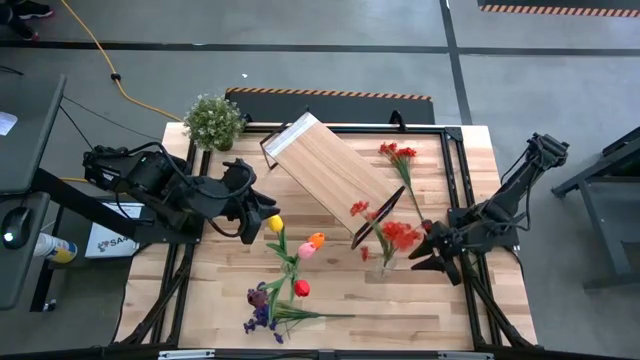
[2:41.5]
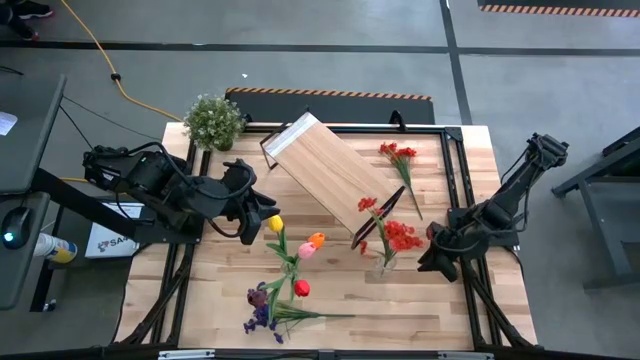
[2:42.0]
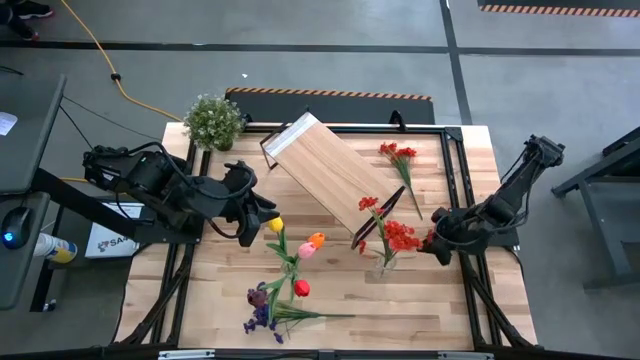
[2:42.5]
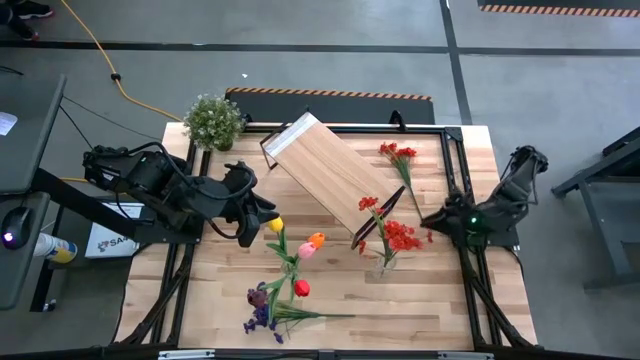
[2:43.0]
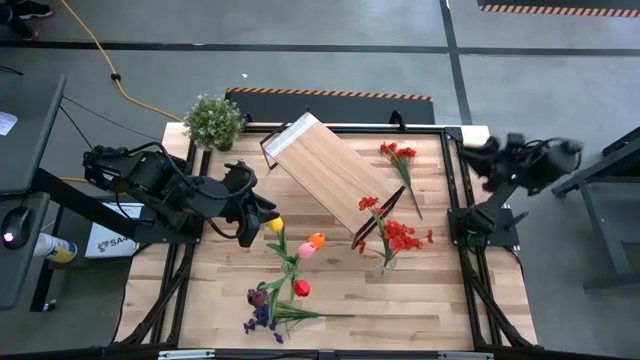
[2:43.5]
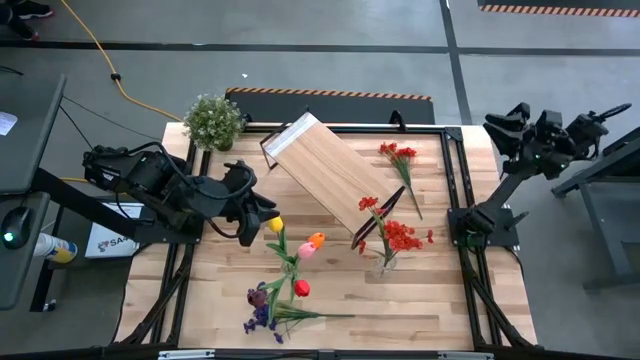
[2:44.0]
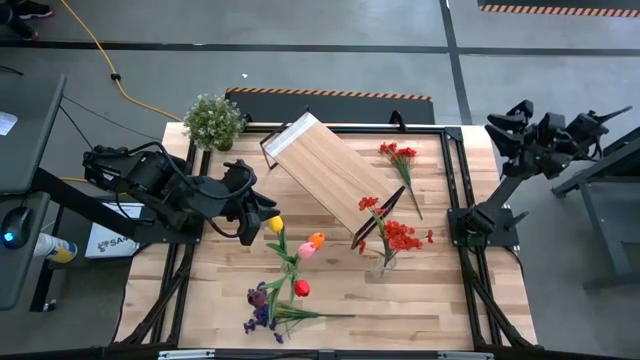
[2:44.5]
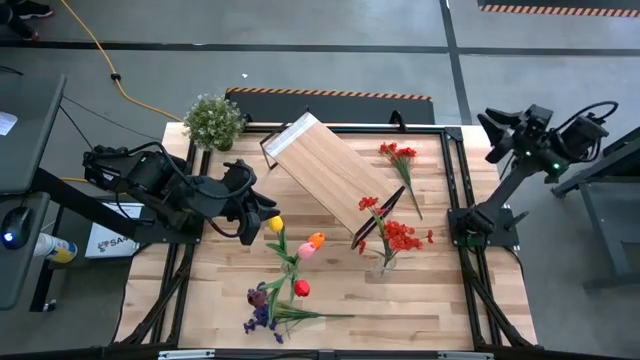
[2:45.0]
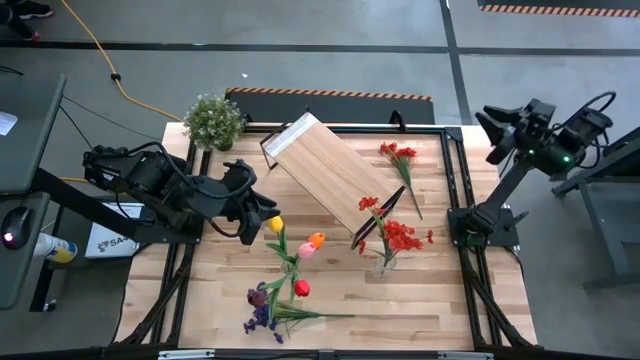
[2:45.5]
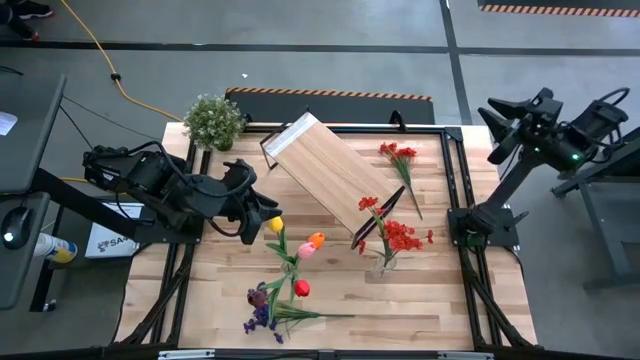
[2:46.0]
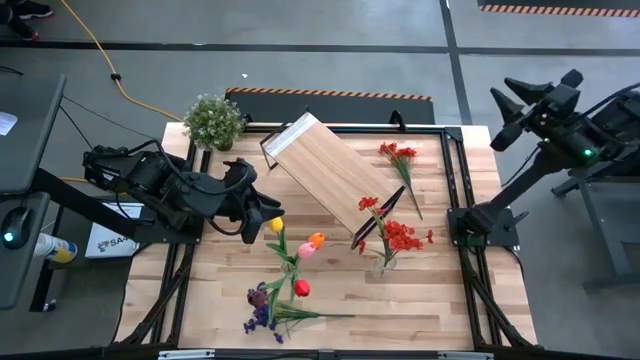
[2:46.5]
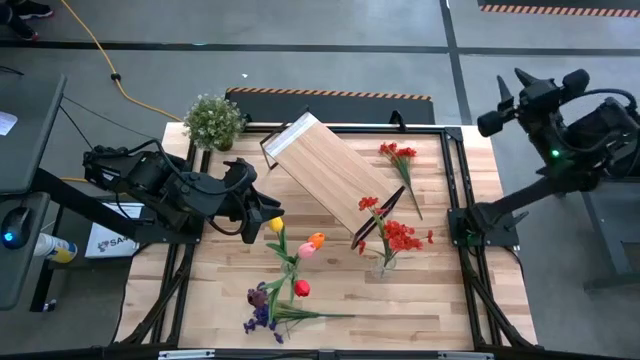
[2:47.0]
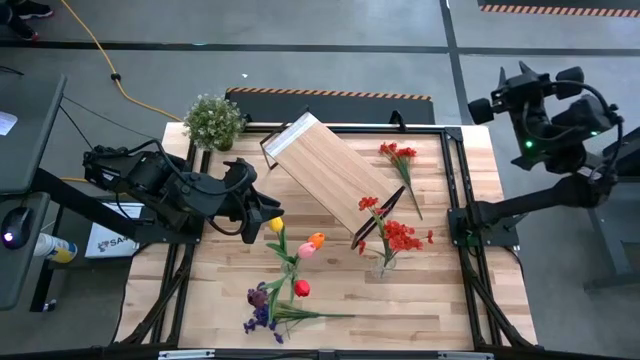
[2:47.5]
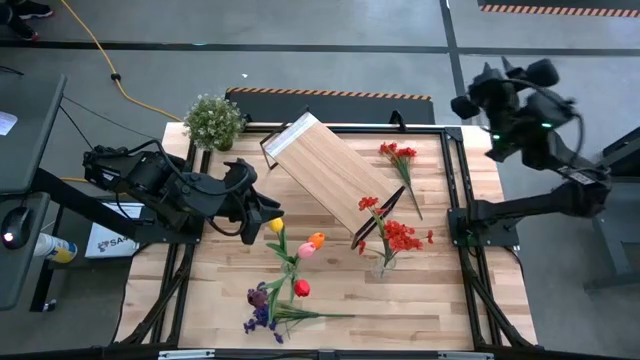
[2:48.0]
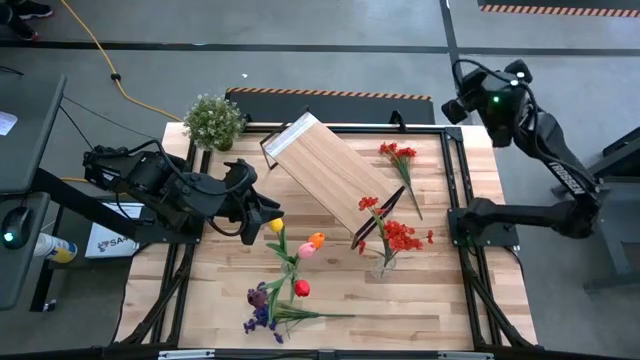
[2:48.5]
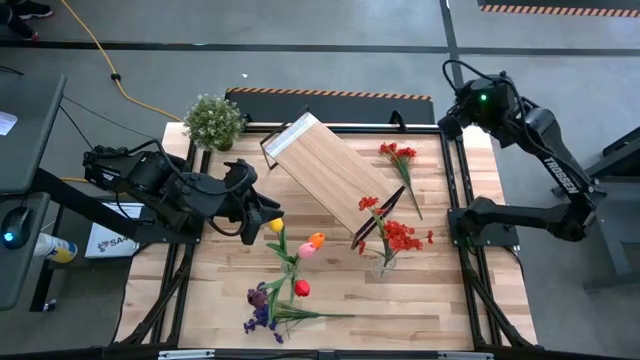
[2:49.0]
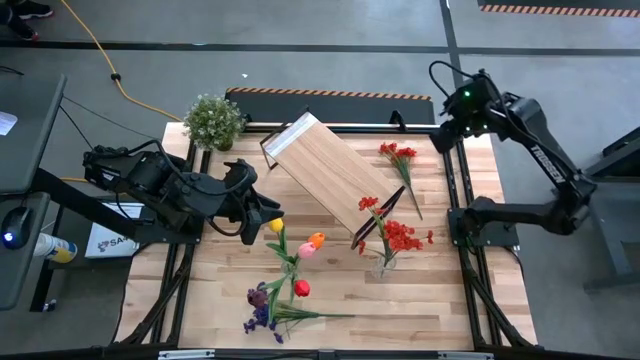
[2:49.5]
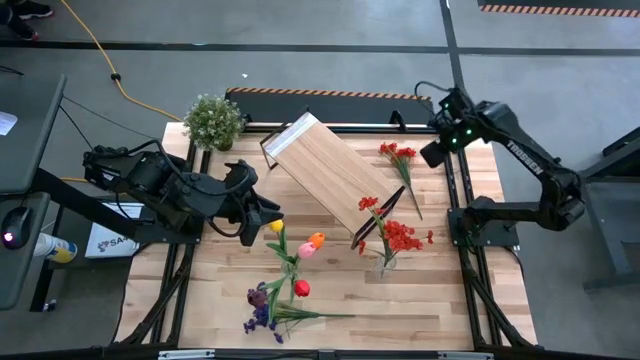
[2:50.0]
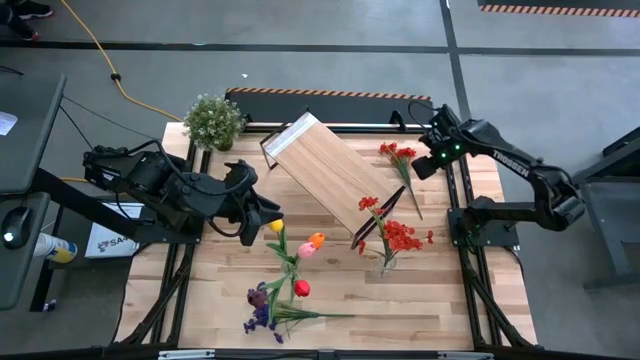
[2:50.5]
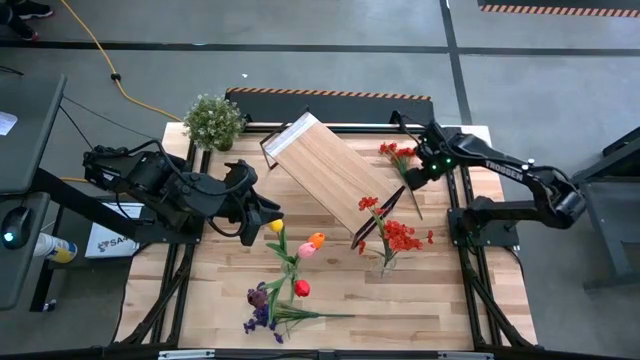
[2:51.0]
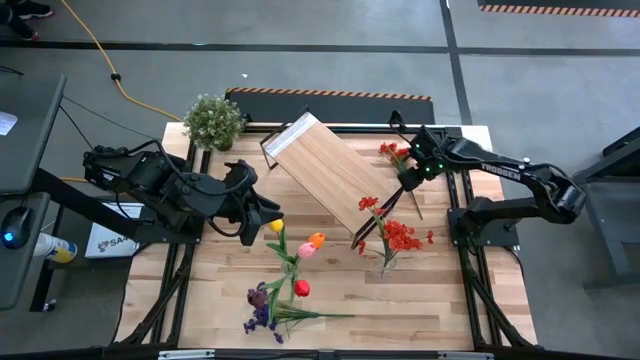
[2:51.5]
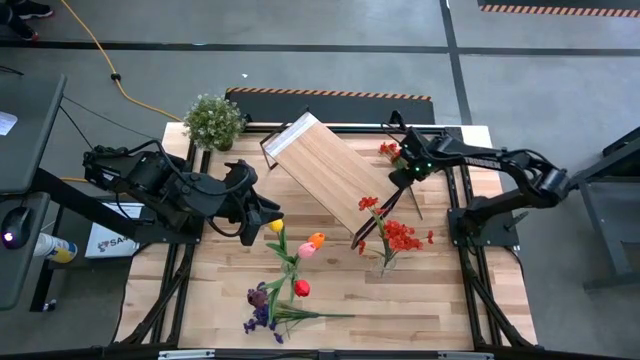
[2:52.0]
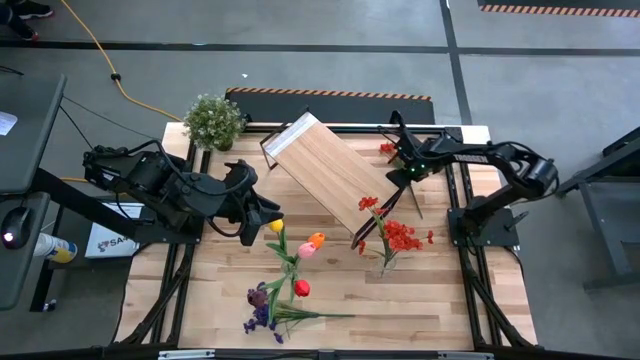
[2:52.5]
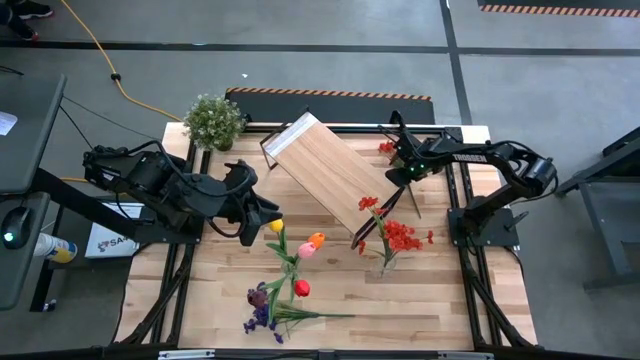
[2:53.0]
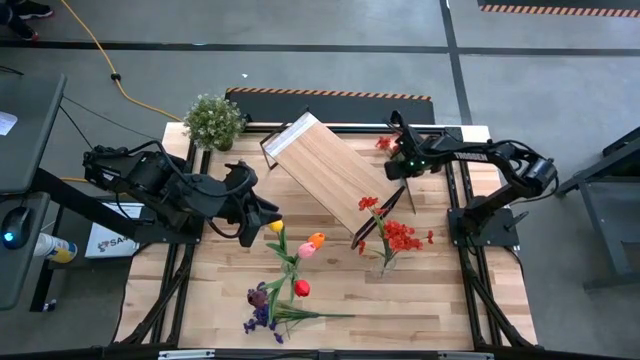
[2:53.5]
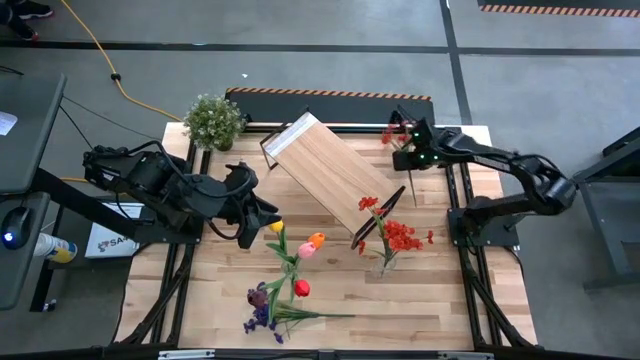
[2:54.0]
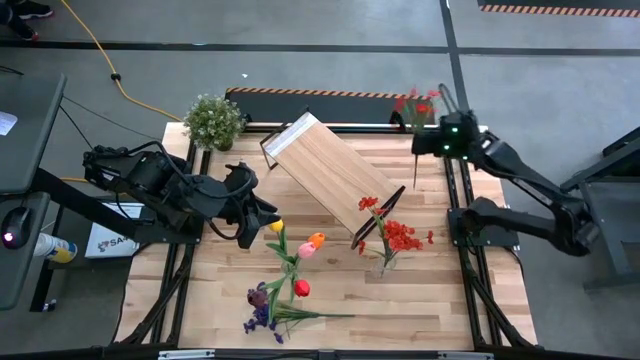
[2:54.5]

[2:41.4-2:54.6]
Task: Pick and place flowers into a vace then onto a shelf
Put the orange flowers into the right transparent vase

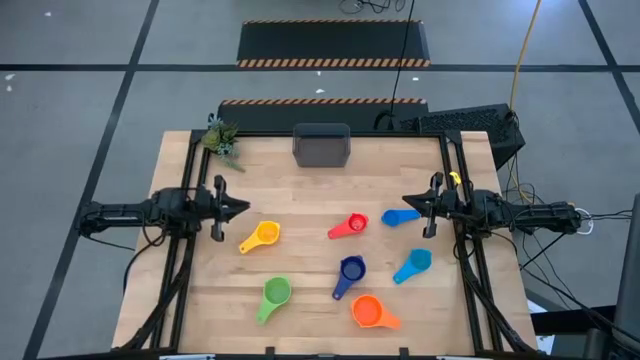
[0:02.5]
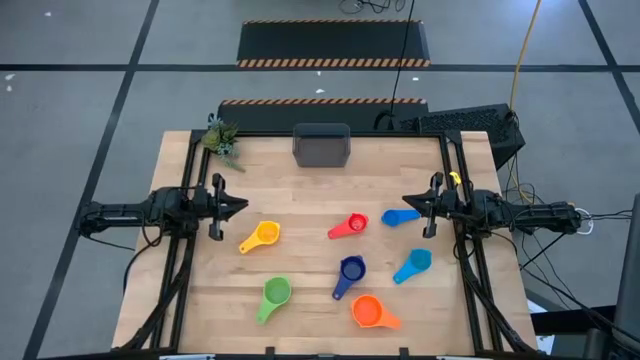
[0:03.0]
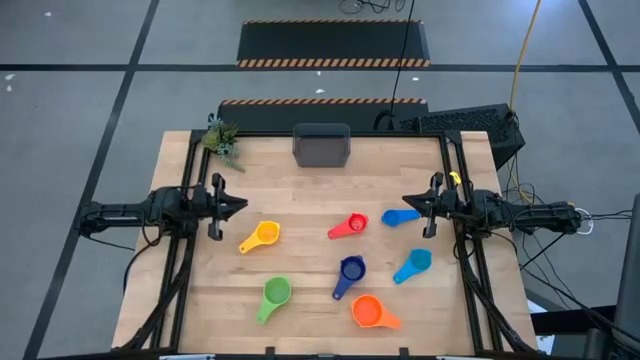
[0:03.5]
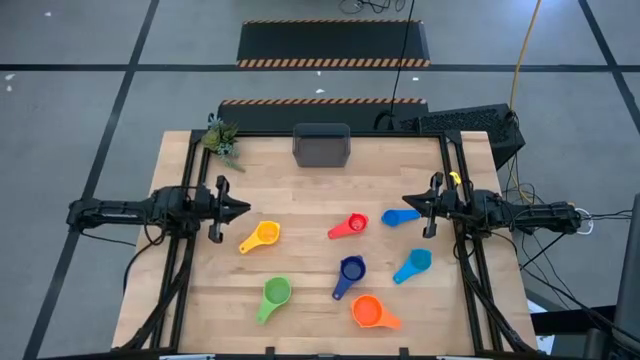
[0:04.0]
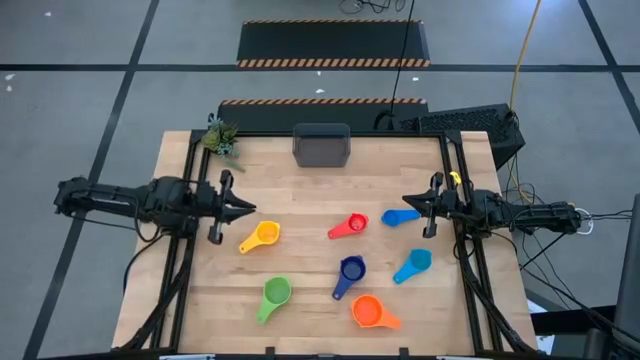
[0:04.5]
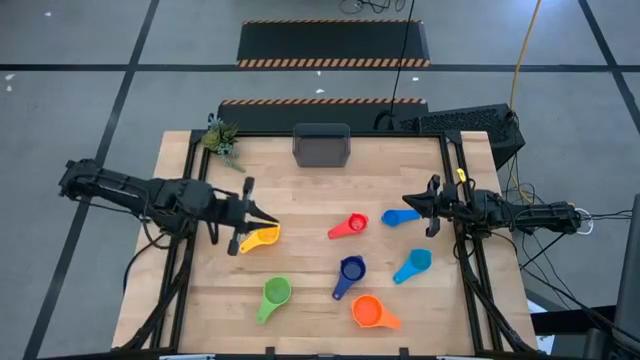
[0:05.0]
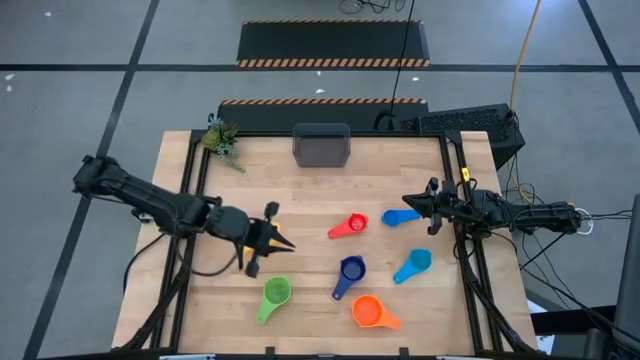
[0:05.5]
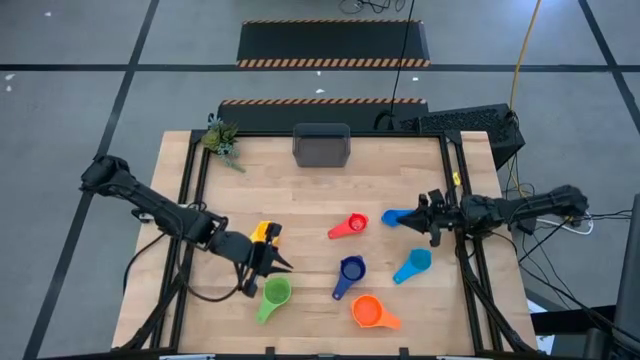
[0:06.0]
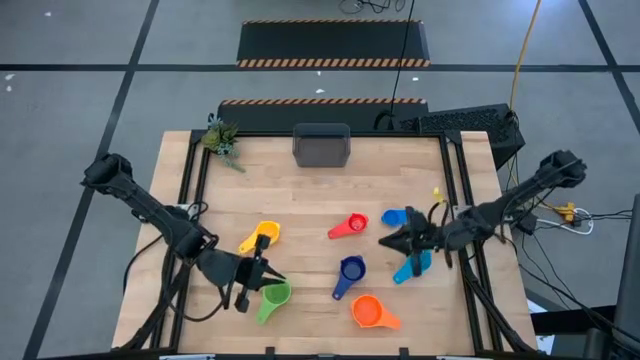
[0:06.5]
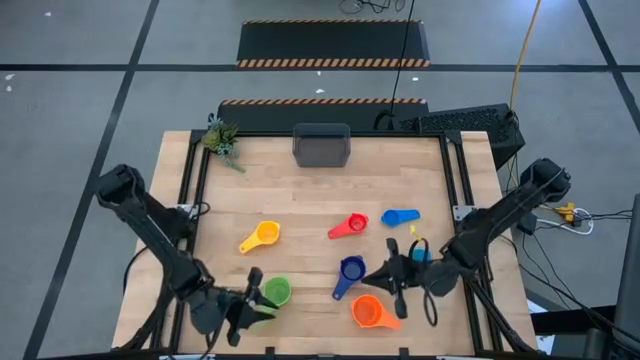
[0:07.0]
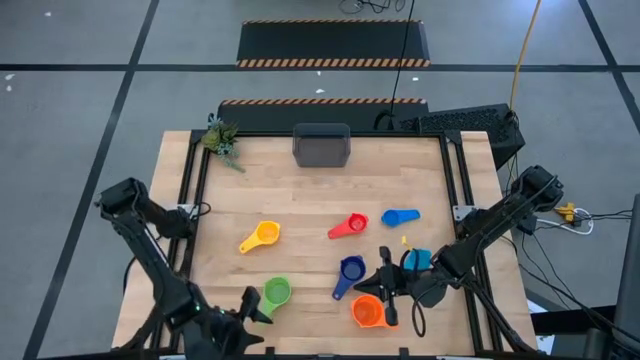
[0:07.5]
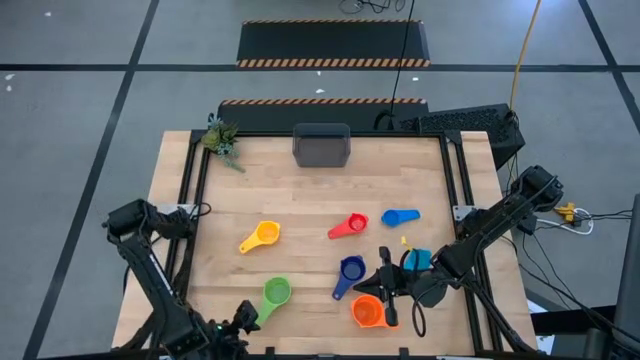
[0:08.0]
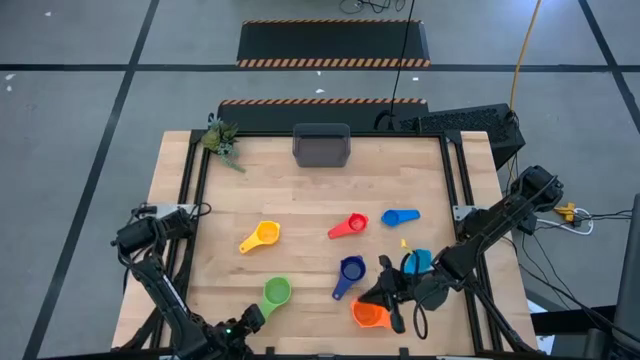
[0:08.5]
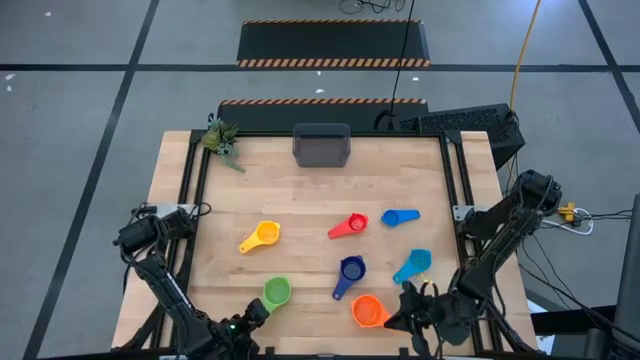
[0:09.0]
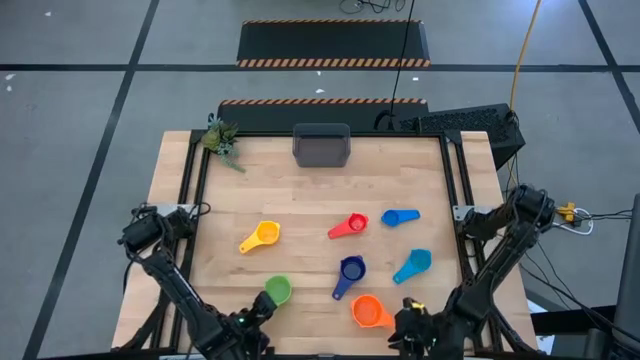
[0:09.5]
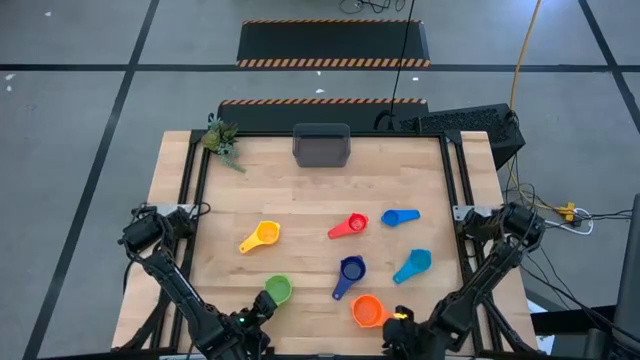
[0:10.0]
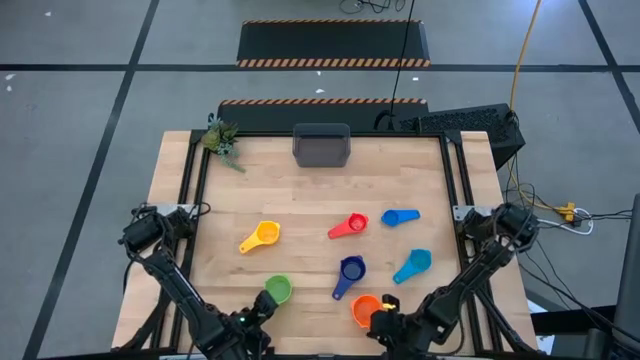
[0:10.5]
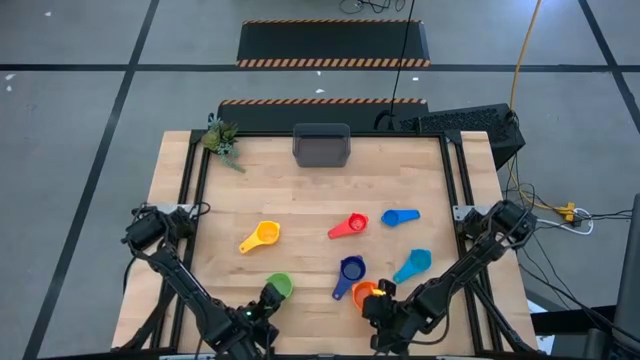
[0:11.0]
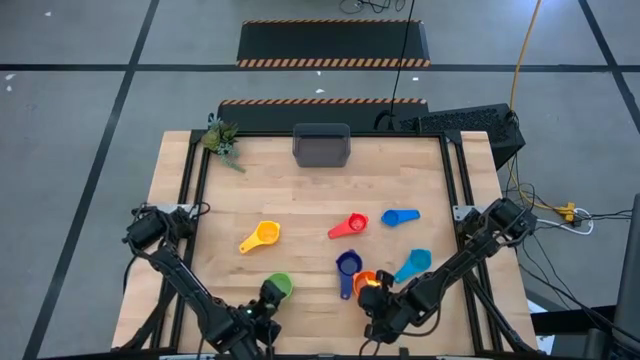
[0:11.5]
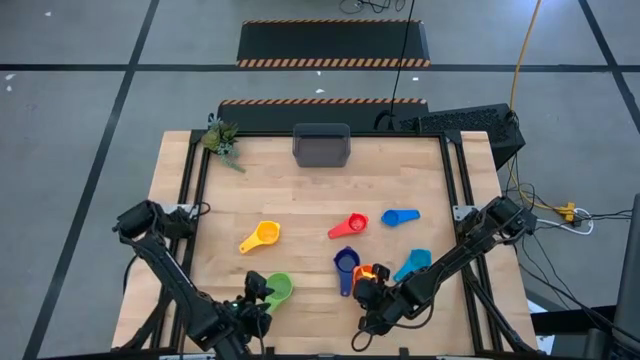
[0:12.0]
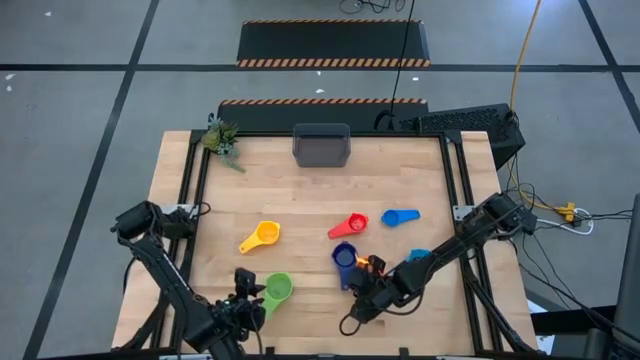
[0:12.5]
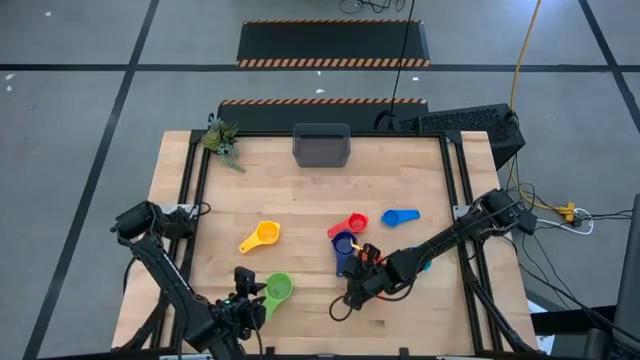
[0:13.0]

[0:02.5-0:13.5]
Task: Nest measuring cups in basket
Prepare the measuring cups
